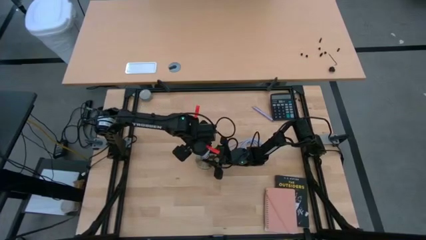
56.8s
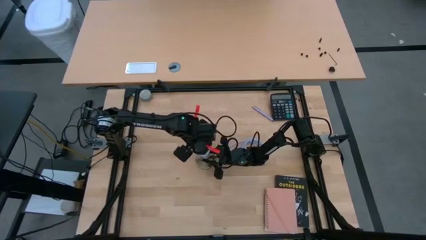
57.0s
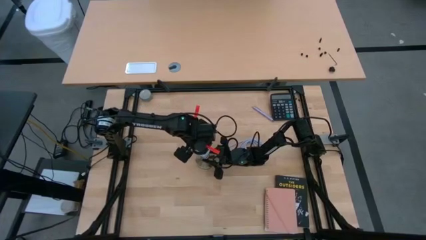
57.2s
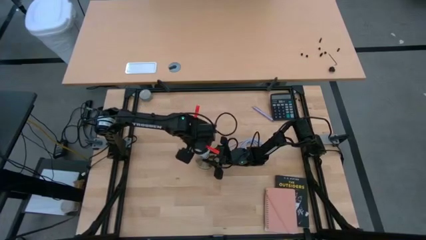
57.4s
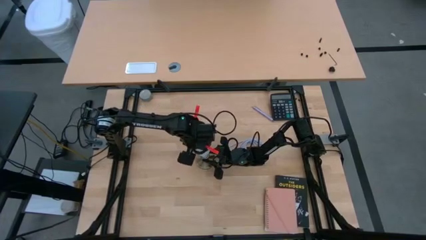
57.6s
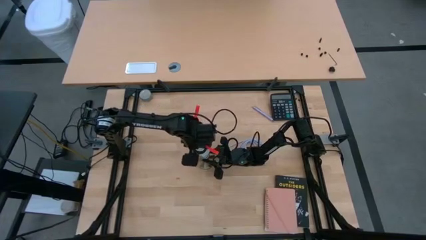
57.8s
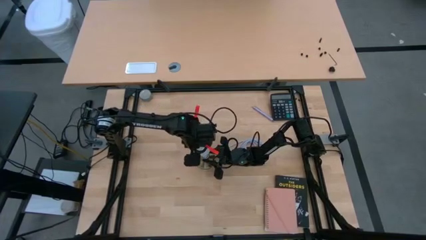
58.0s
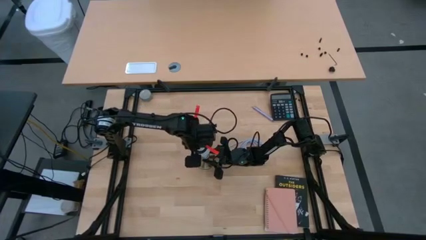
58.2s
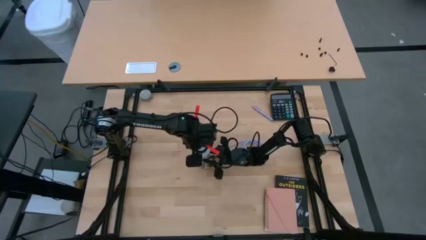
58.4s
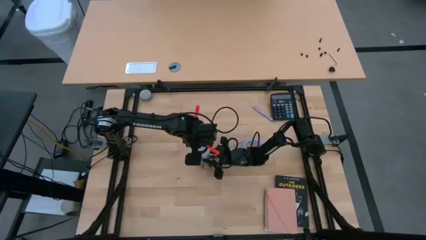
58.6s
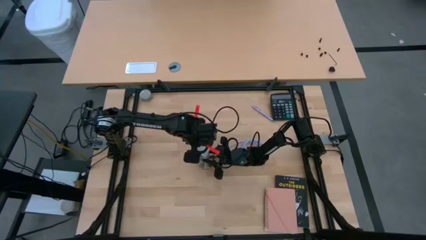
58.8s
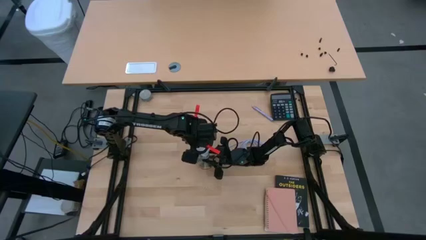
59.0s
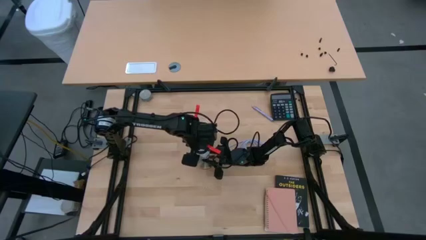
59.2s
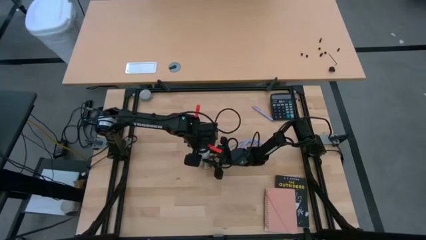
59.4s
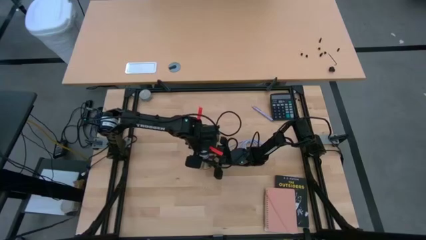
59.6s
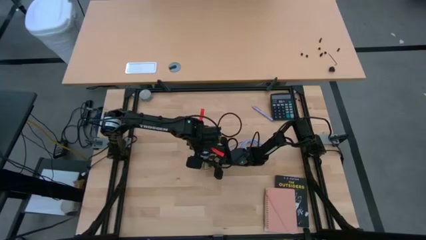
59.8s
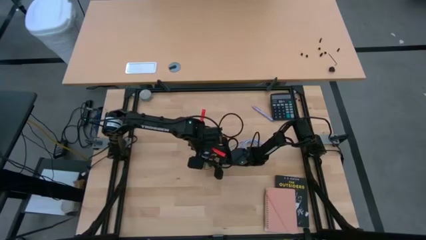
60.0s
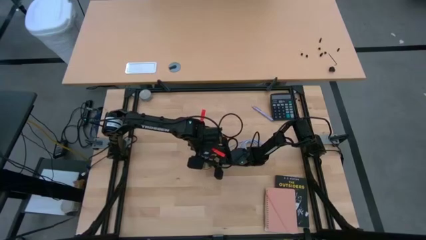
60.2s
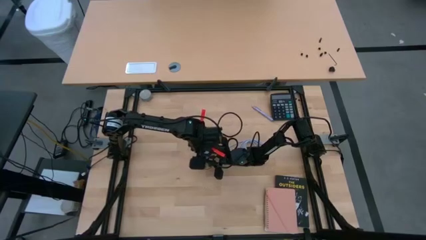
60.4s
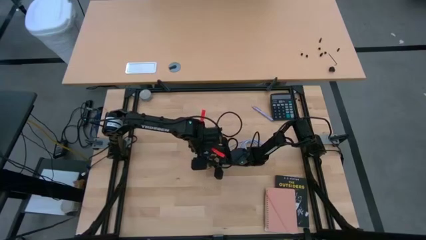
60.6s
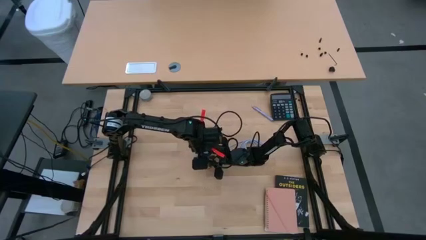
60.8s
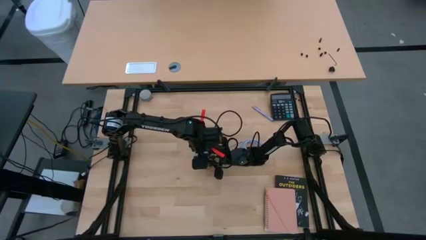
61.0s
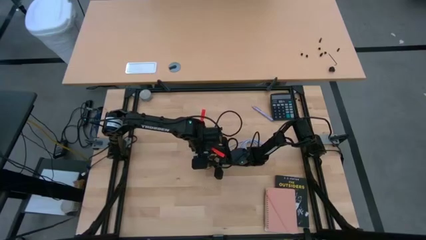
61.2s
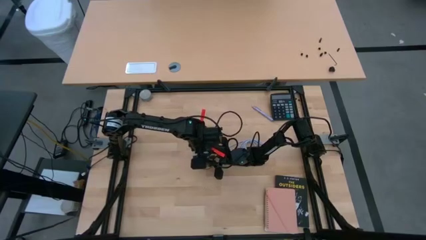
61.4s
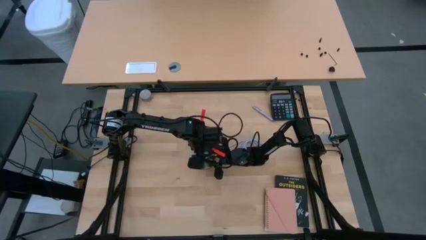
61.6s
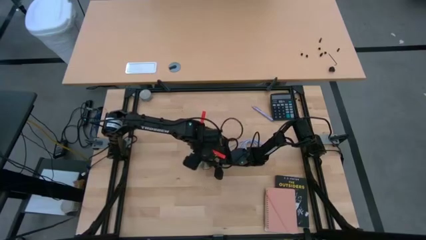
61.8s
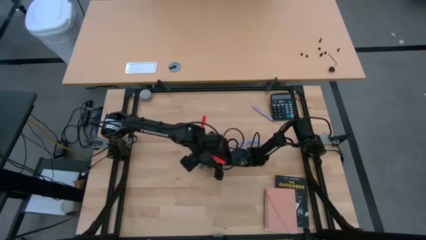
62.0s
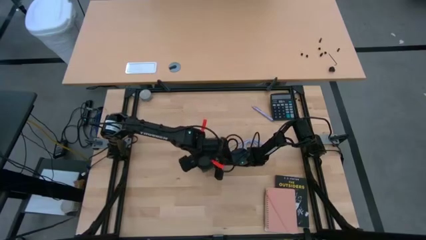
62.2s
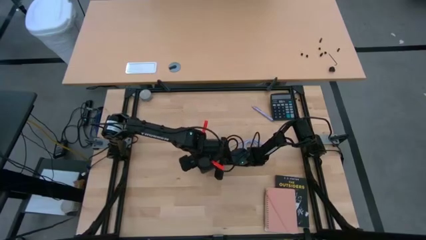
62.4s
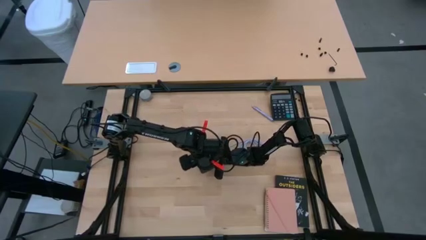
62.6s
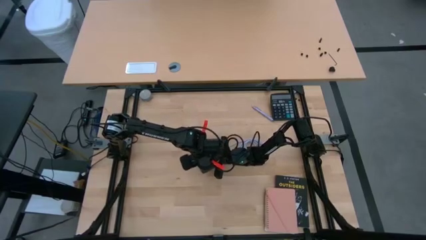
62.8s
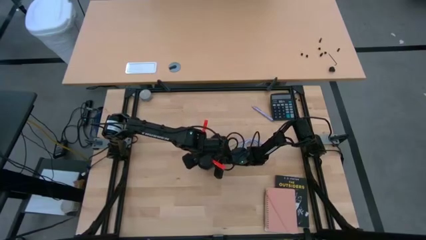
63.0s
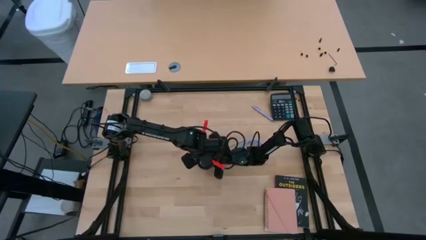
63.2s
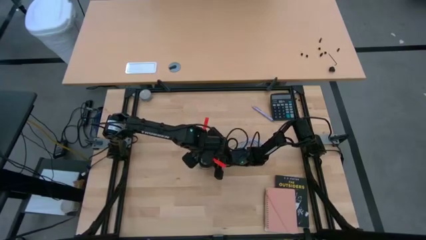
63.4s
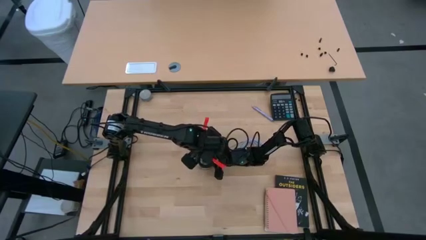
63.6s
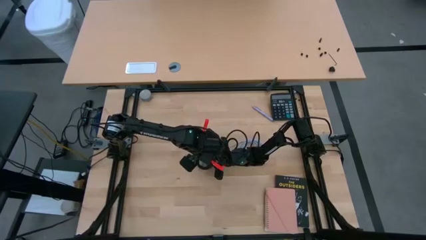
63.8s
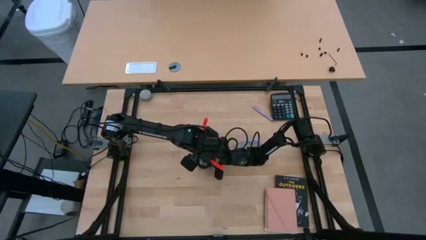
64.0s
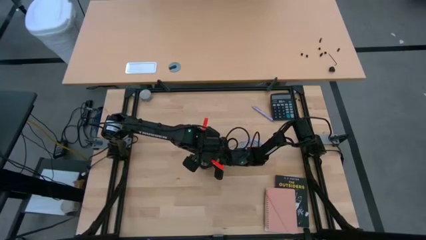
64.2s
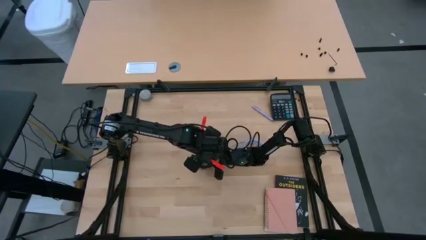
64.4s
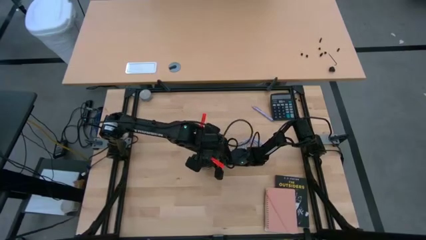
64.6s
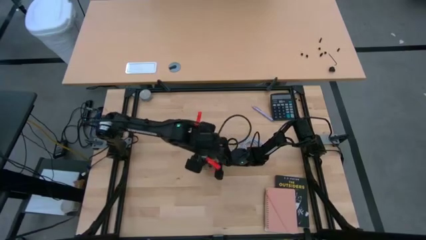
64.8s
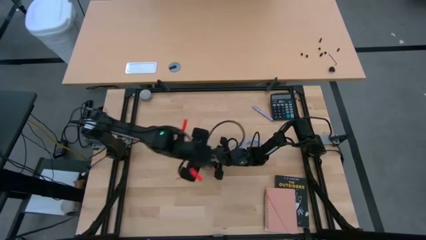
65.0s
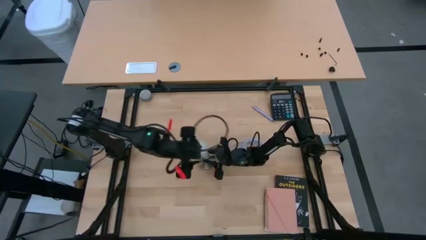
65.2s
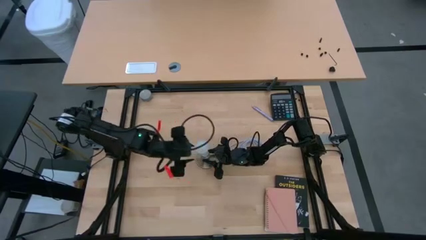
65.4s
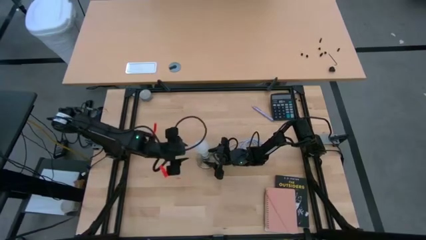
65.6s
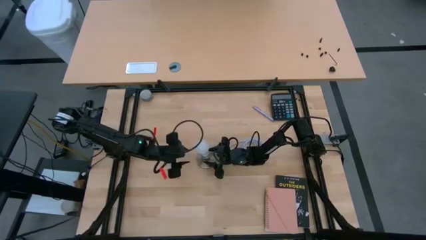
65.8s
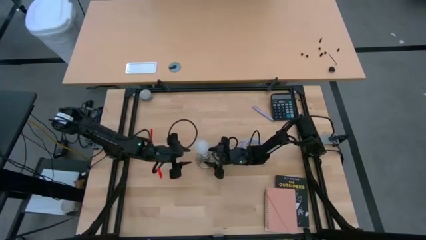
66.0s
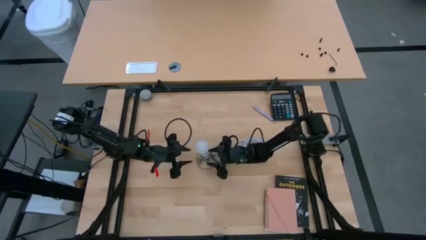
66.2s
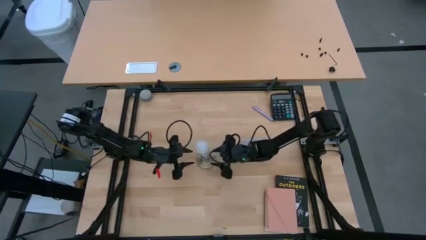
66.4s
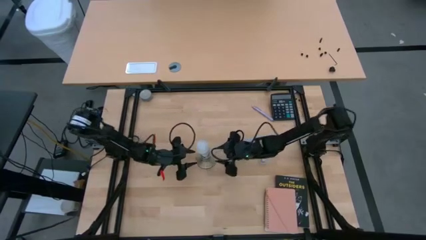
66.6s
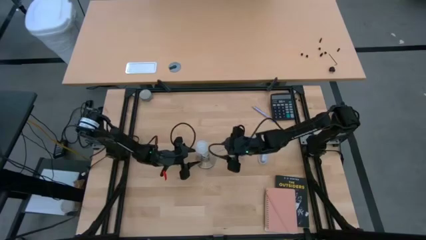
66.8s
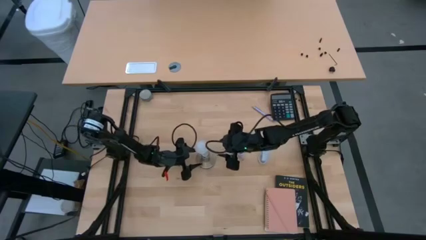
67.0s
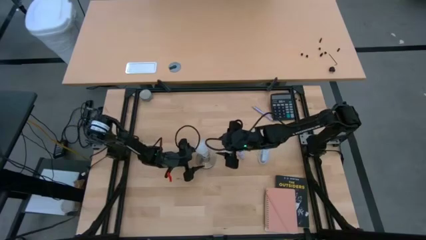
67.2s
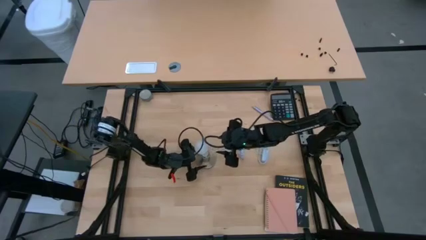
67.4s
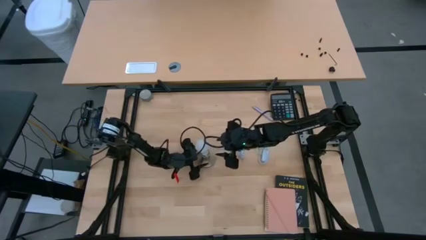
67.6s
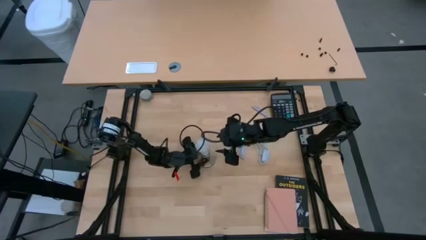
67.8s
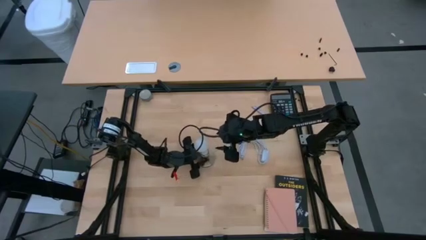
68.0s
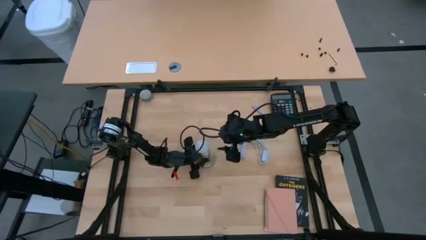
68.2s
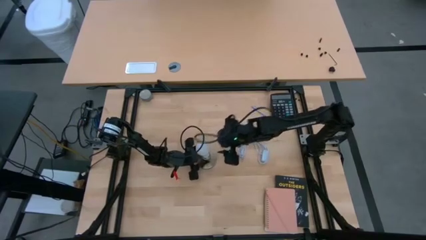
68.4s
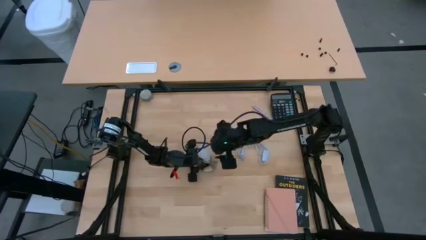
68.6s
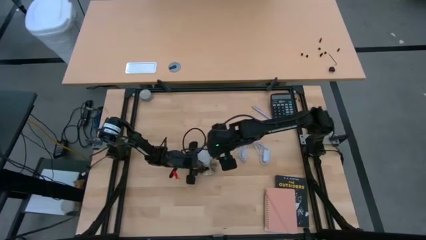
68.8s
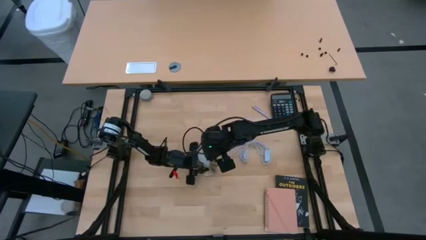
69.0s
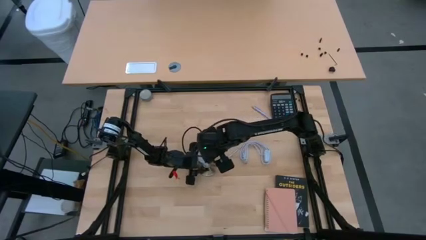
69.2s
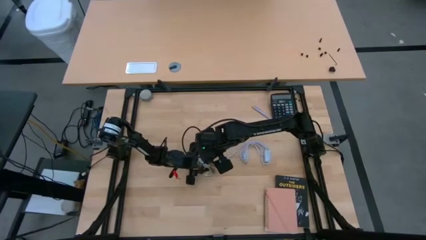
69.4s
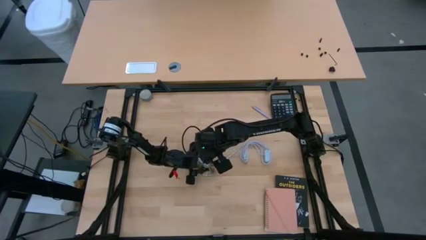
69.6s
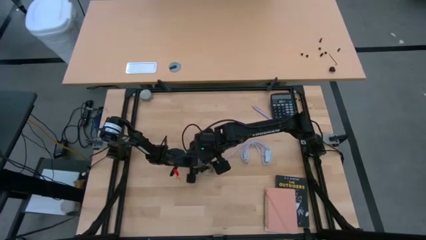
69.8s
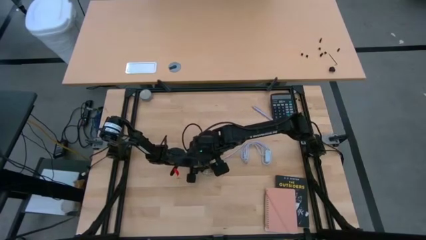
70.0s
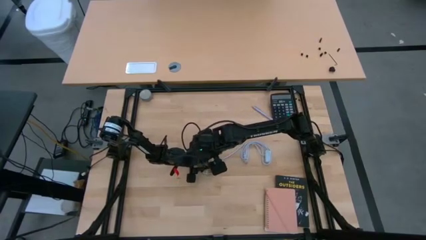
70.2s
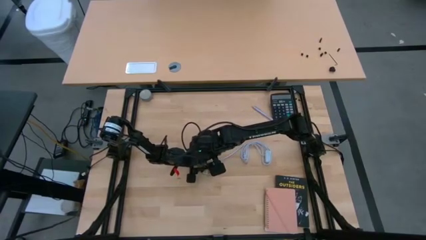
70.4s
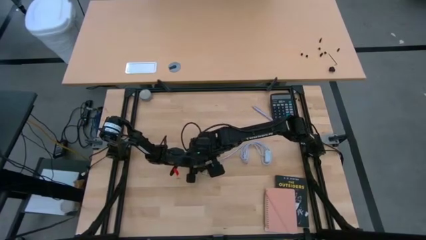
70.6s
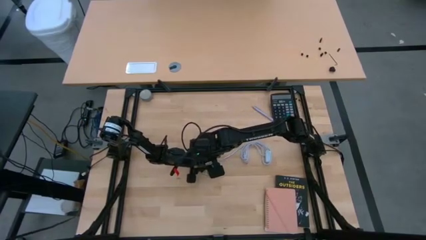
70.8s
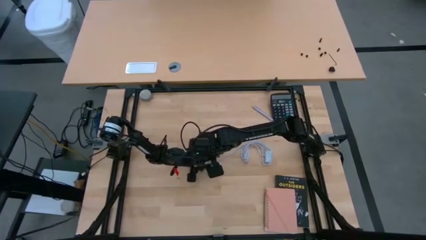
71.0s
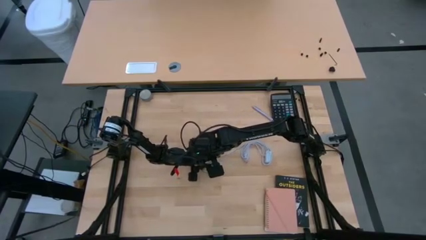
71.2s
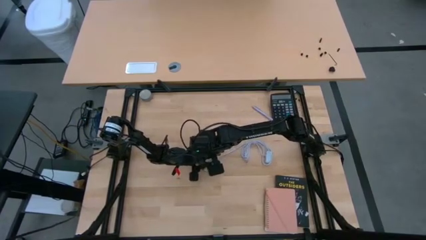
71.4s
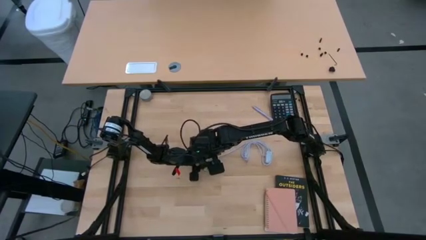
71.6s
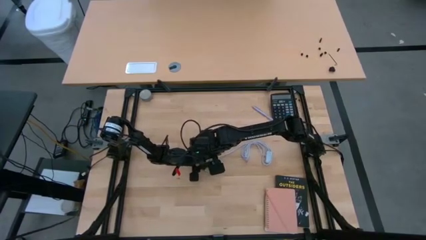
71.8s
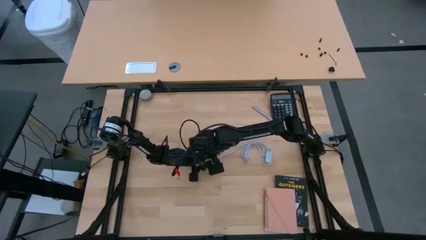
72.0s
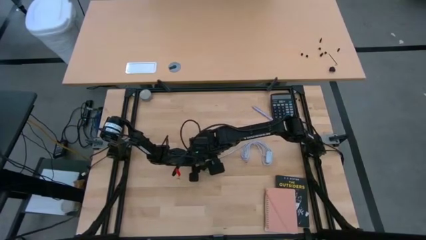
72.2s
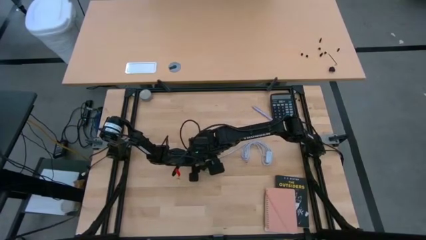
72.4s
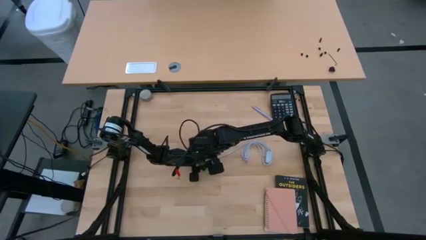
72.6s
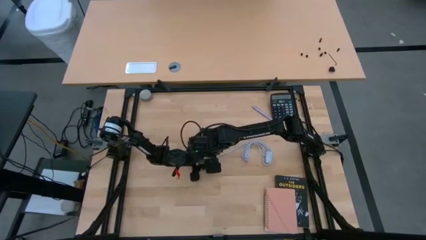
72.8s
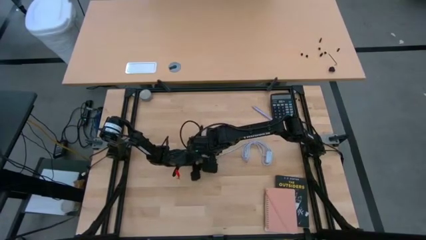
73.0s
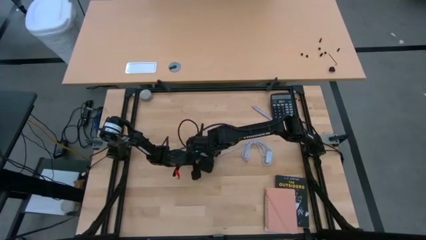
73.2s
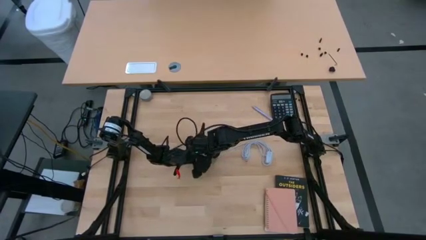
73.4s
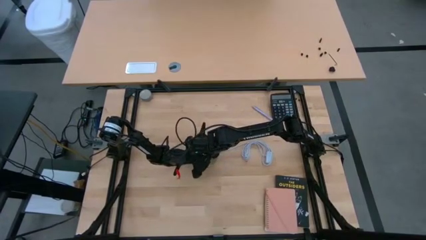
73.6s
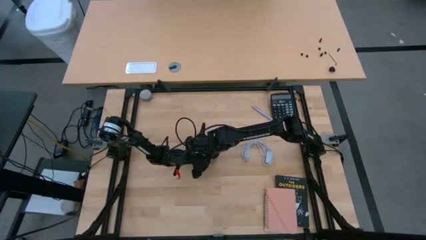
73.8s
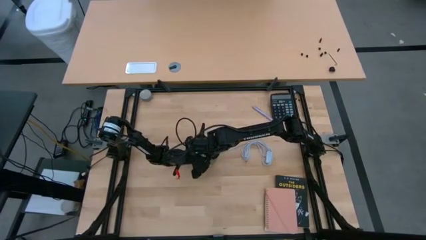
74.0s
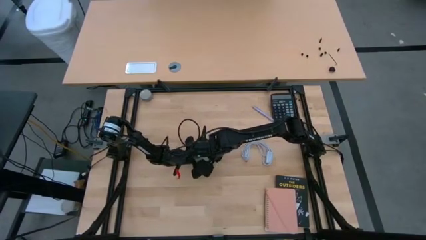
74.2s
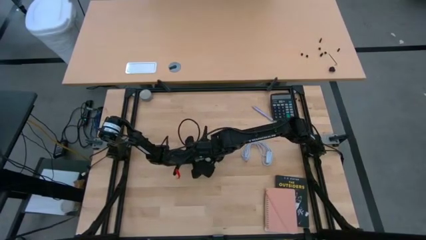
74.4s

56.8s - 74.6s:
Task: Screw lightbulb
Insert the light bulb into the lamp
